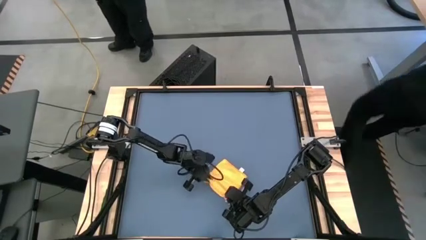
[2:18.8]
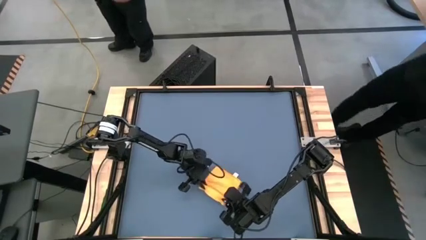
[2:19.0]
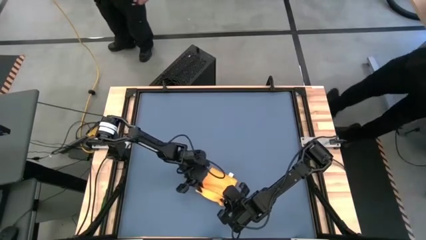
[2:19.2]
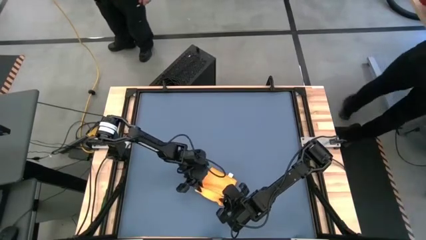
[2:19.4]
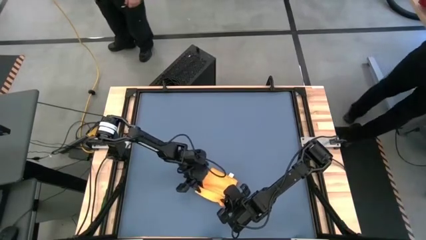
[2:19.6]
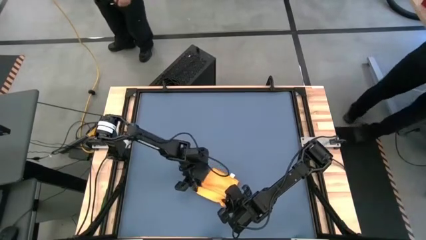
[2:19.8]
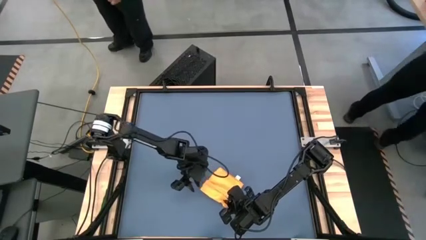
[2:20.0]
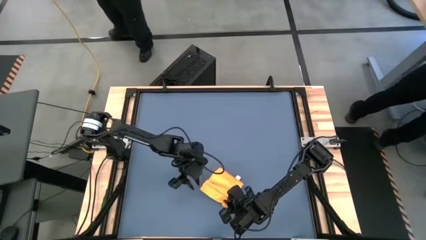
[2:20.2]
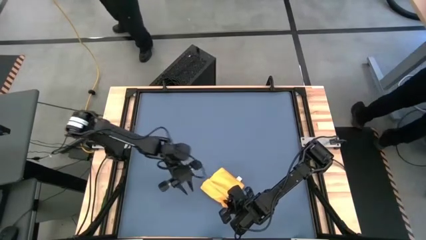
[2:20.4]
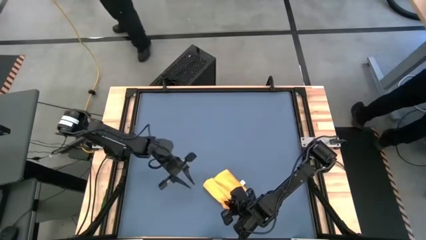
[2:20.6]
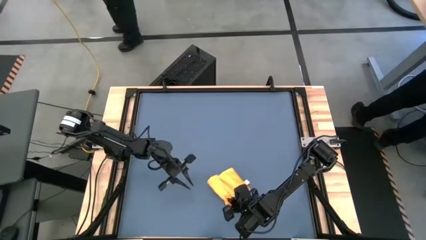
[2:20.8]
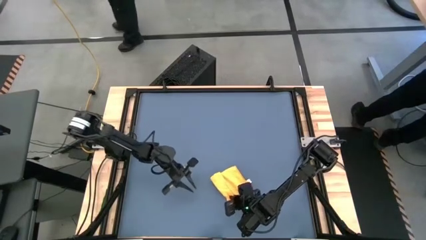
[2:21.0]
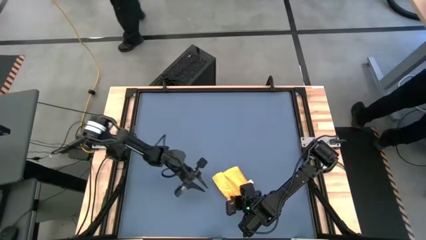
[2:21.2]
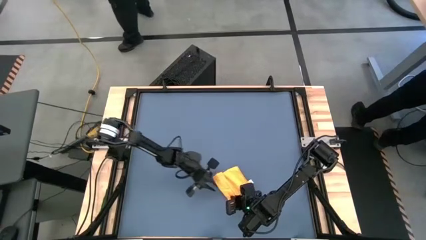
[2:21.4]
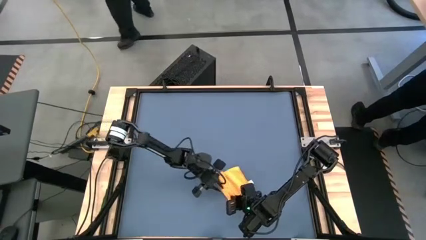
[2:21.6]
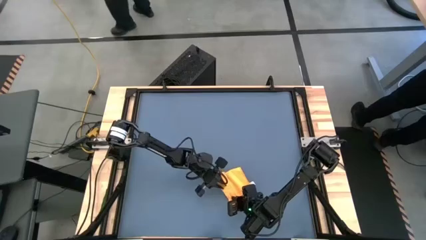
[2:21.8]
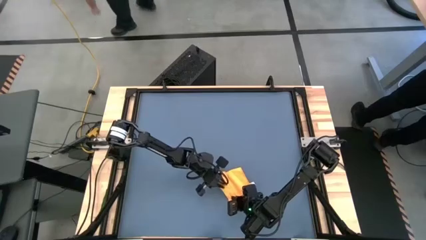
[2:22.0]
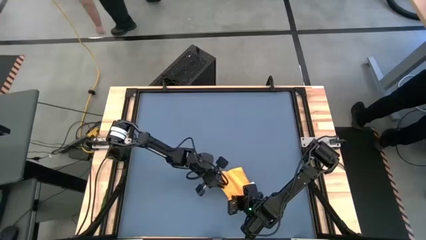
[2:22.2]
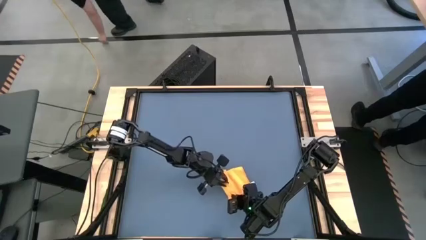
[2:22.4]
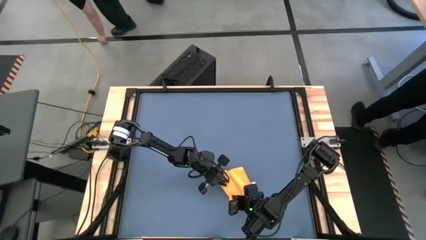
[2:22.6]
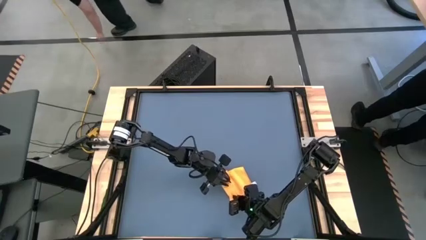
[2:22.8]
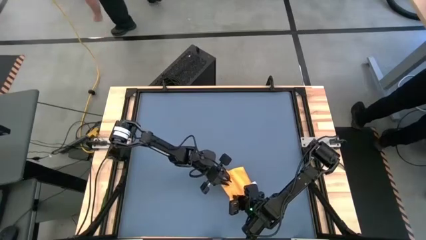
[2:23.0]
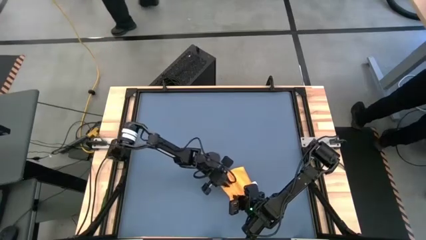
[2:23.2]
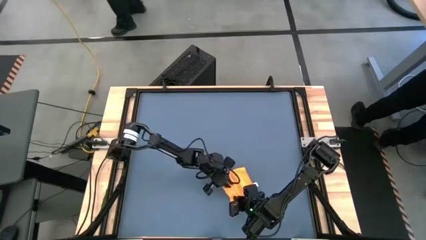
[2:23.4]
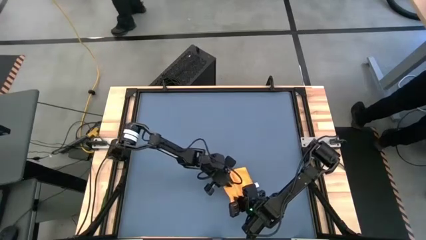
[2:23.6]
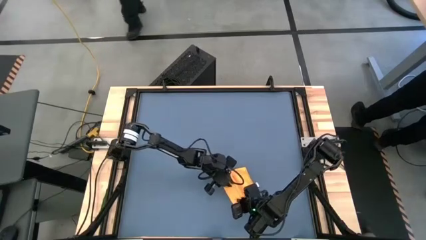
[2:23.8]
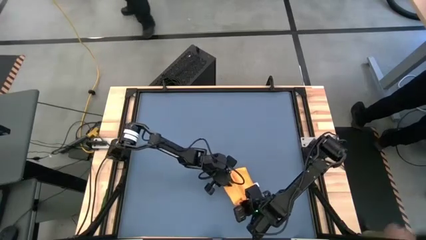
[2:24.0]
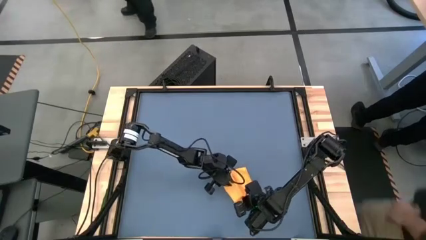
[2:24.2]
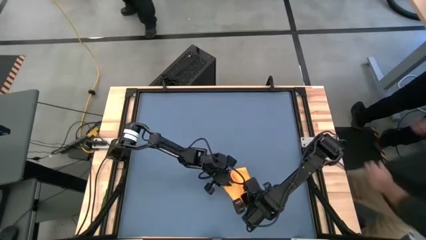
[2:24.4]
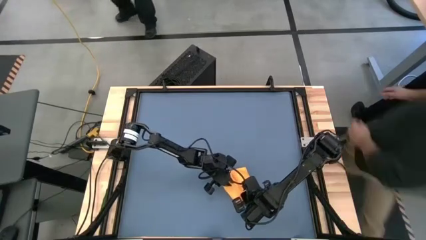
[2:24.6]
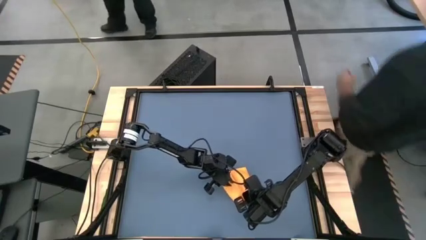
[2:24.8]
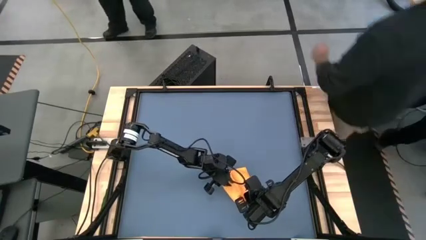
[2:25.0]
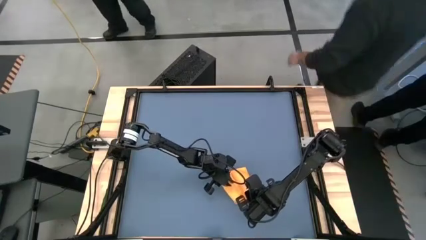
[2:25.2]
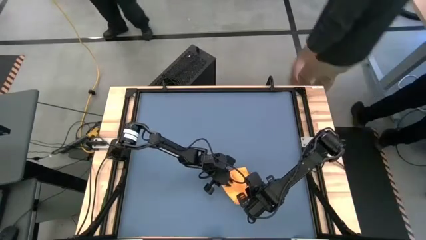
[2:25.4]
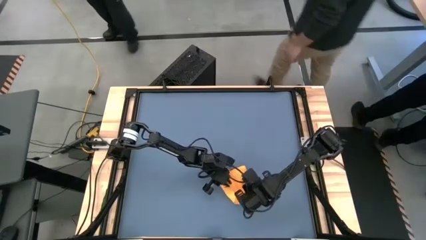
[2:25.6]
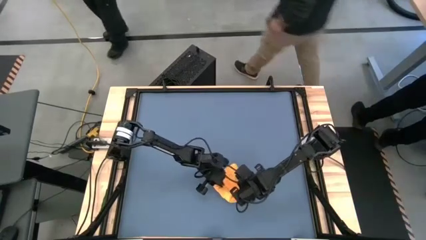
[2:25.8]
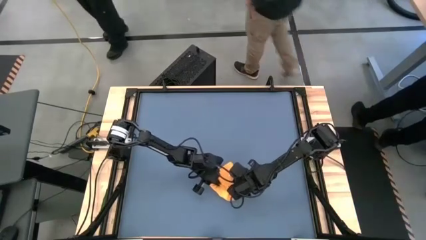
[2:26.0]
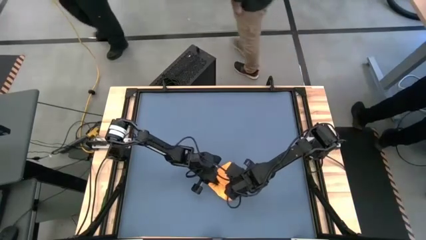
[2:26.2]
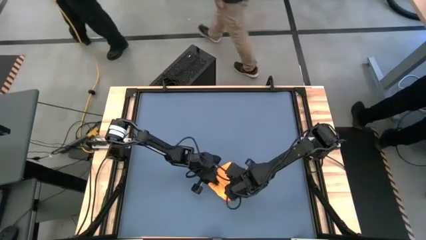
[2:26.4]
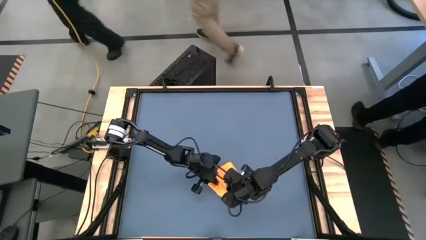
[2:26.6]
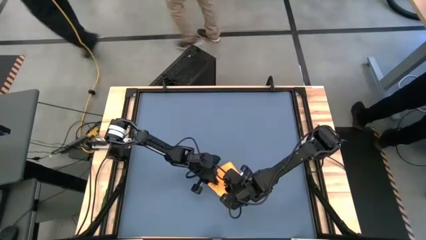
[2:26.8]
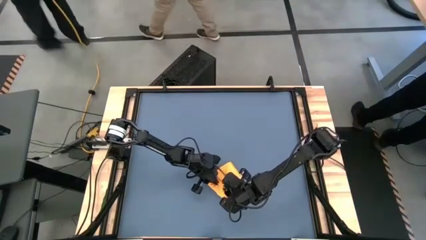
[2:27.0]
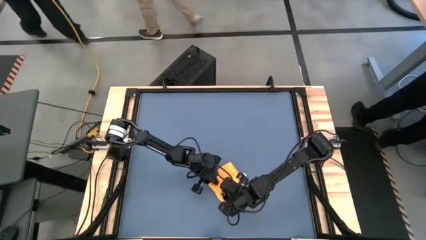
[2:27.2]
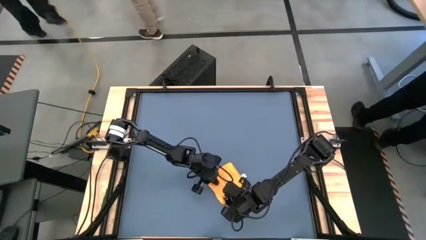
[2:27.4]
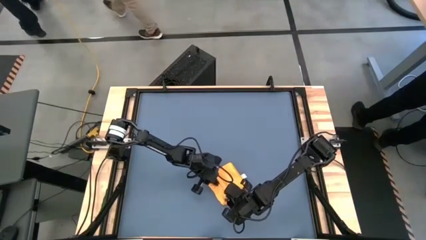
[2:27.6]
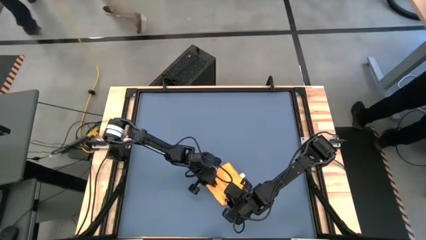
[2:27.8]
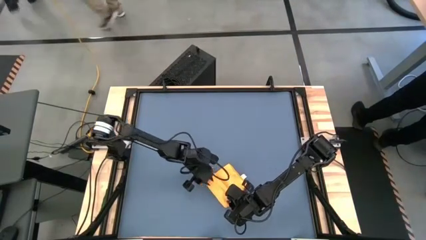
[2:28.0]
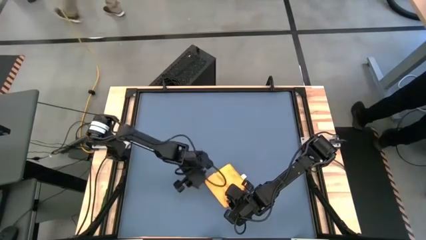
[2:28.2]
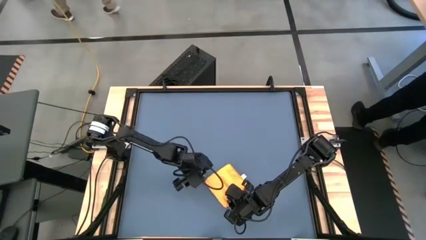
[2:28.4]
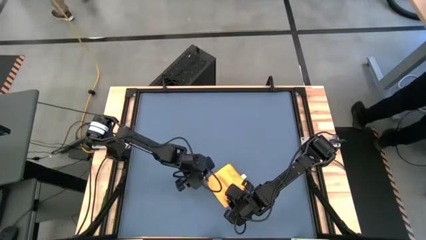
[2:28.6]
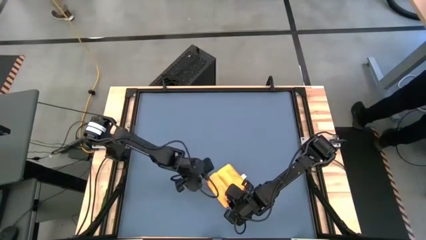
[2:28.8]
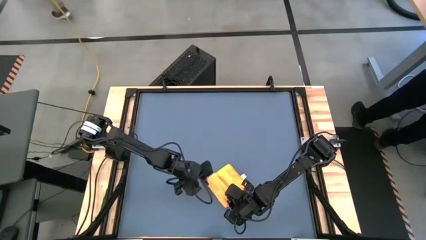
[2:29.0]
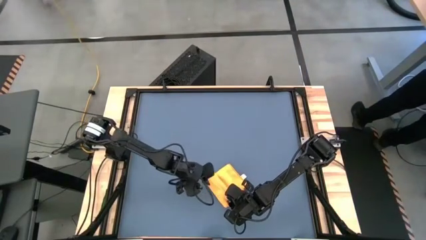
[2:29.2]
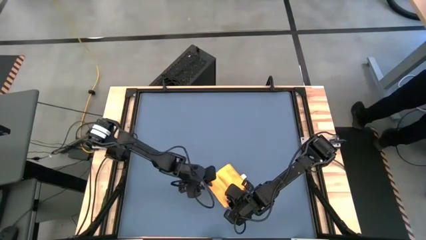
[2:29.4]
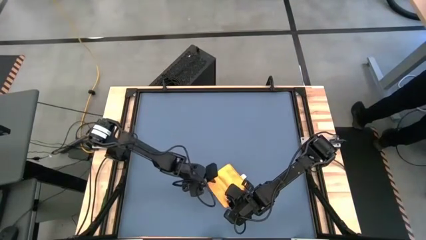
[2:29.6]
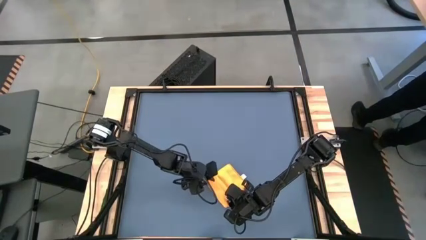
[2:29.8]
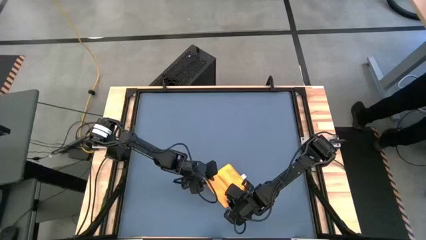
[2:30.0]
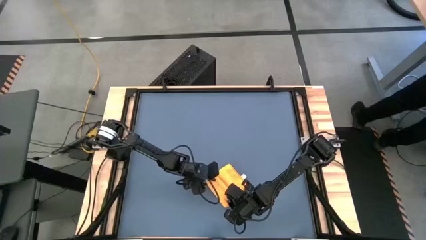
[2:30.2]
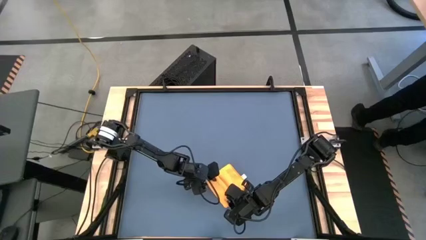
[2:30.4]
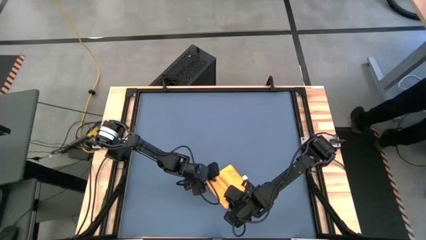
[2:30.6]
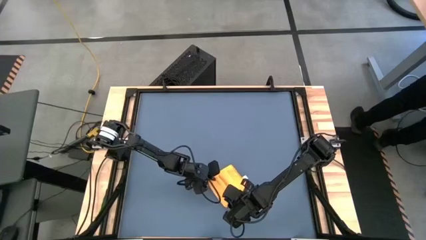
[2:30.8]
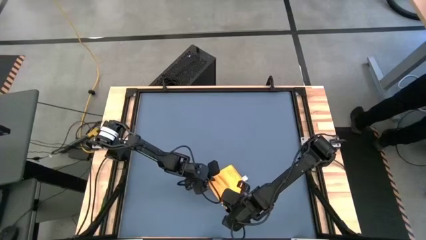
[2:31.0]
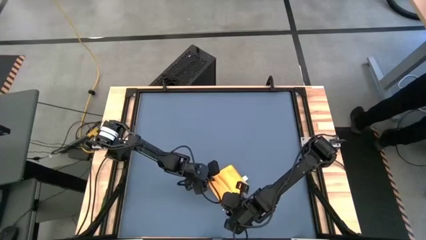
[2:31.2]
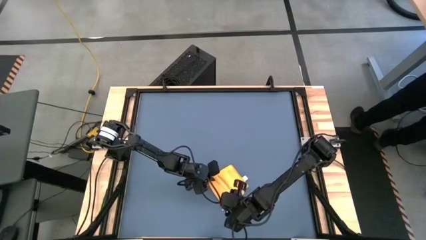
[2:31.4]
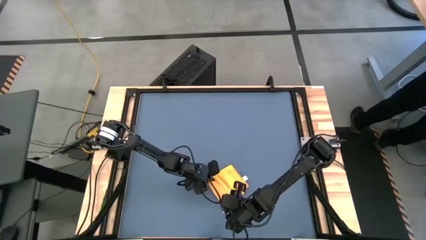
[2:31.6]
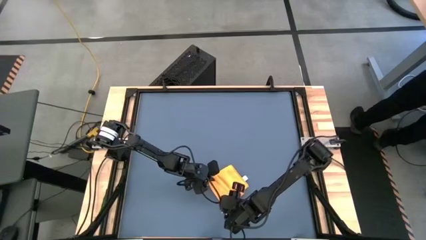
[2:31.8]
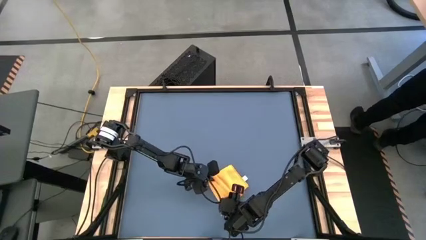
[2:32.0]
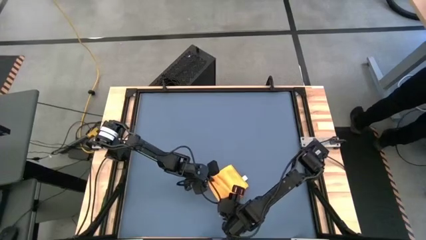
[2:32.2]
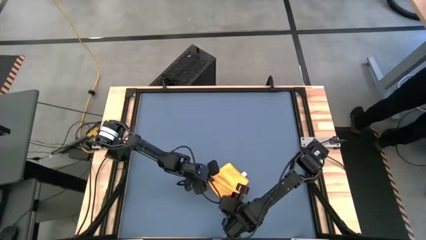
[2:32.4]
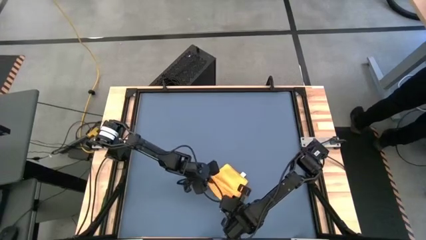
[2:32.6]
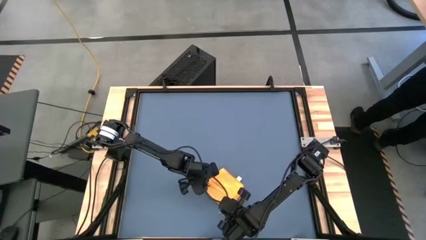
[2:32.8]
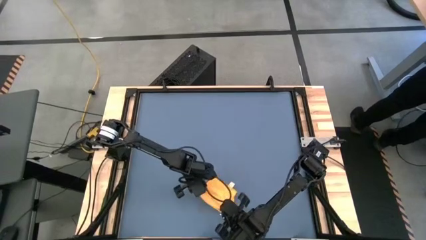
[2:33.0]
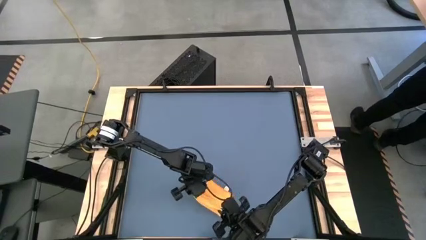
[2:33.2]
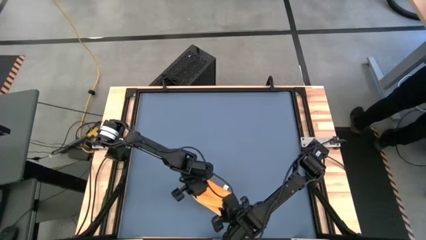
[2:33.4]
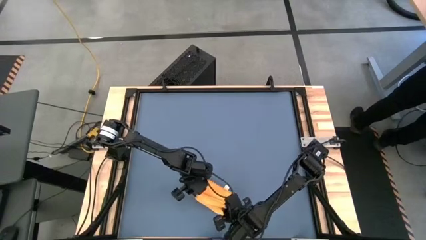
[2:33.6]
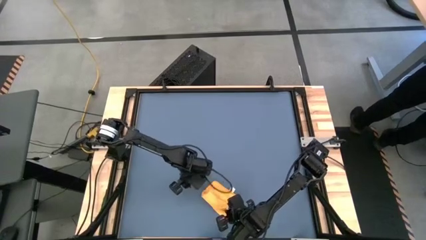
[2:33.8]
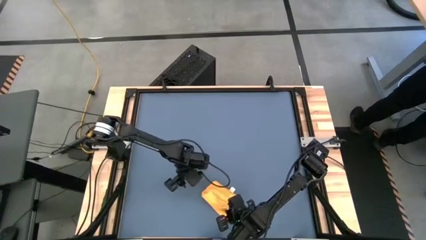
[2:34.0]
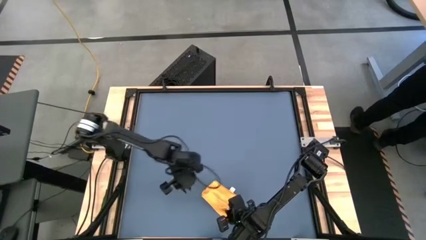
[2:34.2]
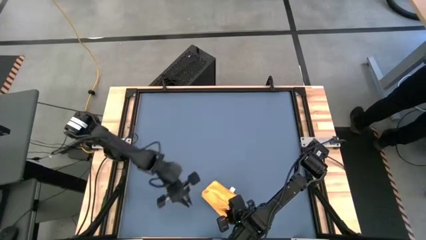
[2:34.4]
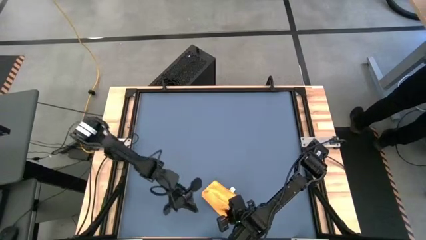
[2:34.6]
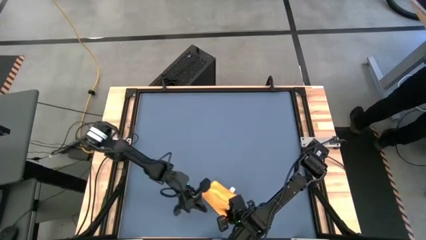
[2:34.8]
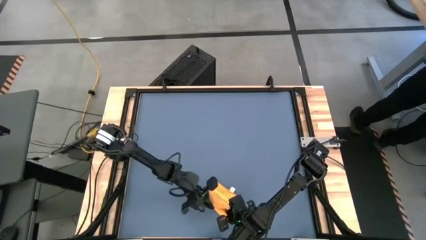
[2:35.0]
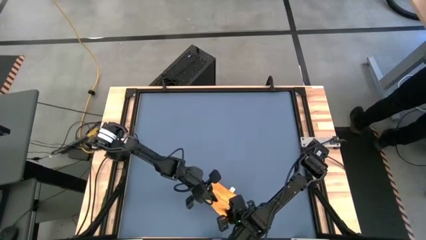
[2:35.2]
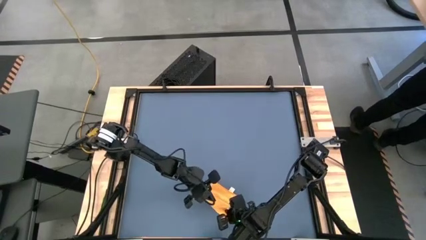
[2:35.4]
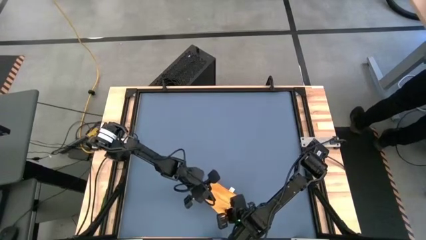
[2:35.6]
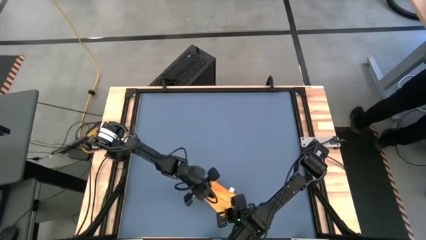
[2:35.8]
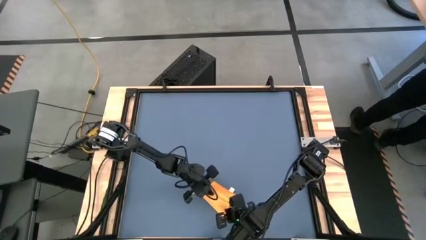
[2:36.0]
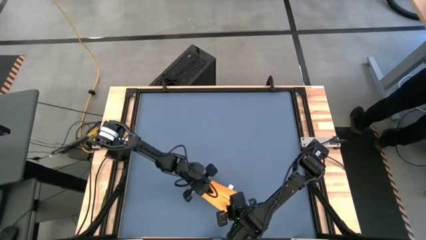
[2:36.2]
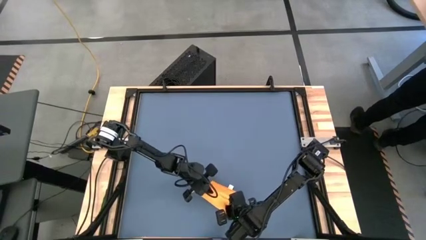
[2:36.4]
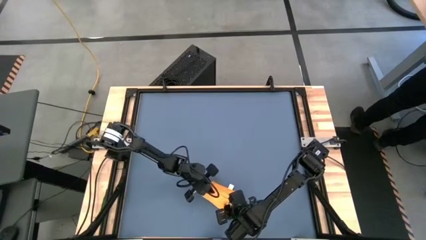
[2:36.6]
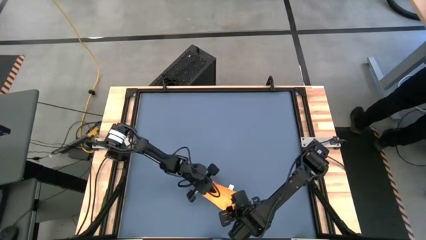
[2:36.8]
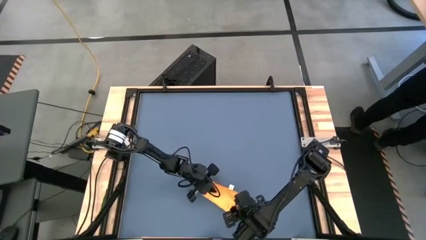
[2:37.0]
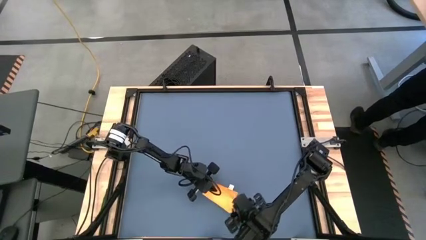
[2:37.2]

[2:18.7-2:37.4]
Task: Roll towel
Roll the yellow microfiber cloth
